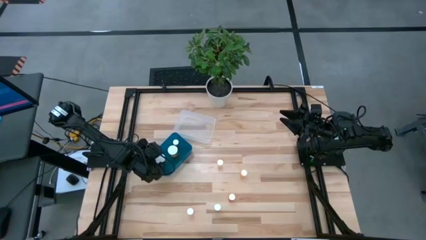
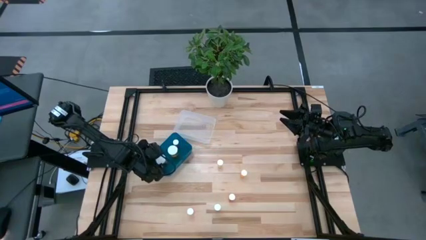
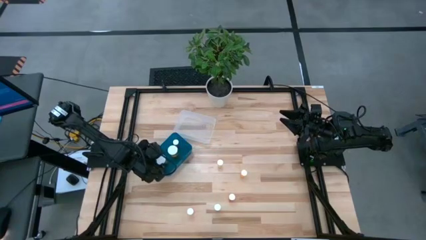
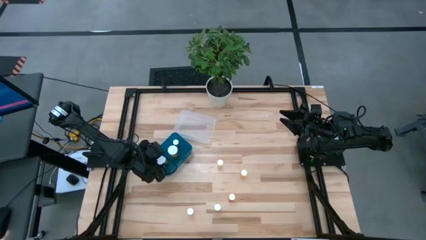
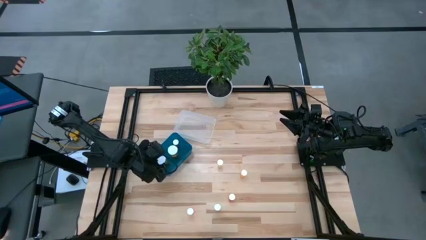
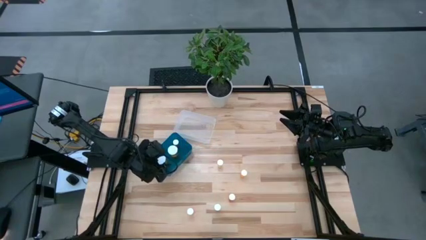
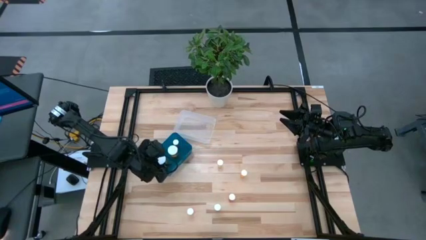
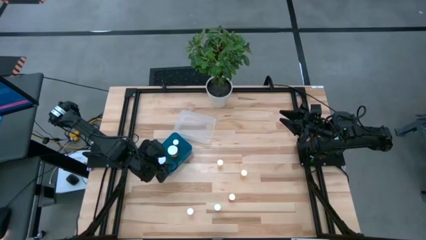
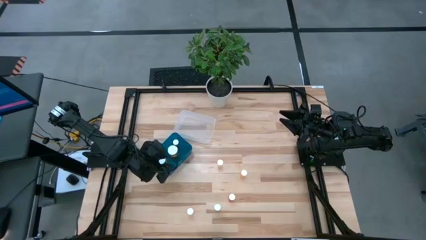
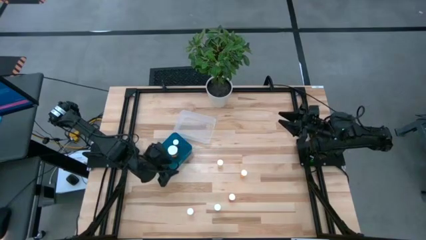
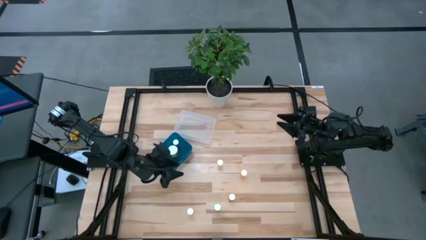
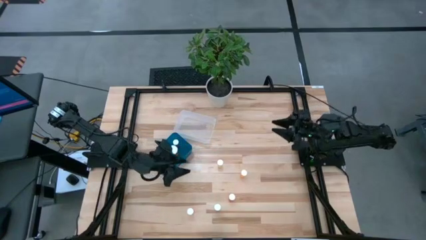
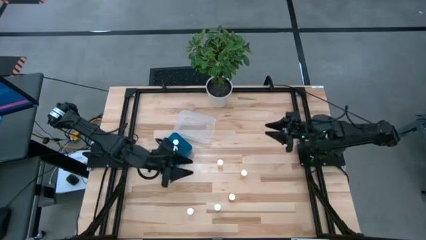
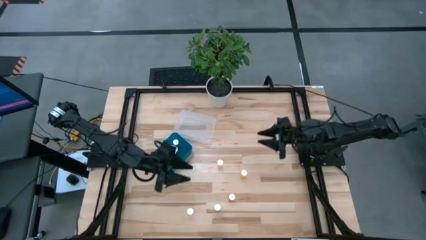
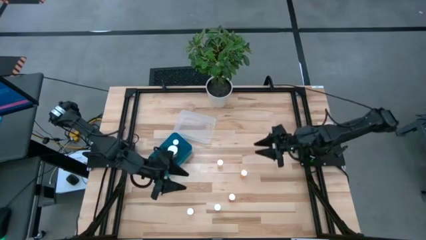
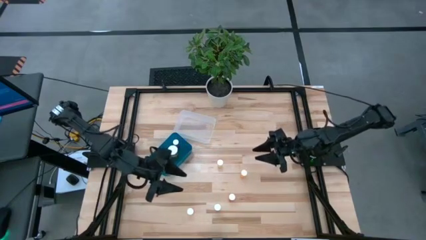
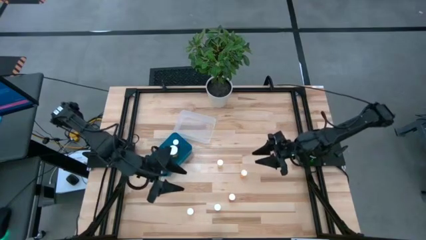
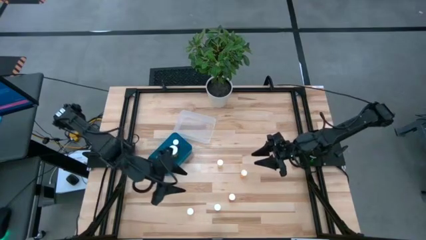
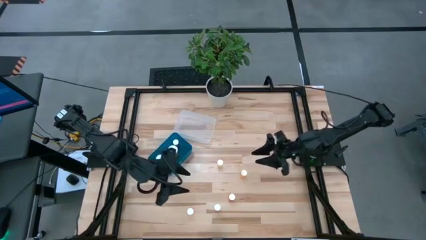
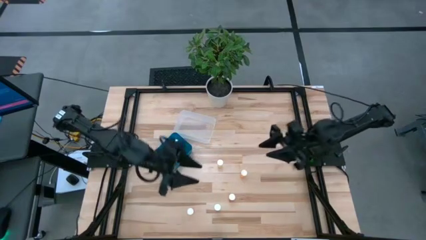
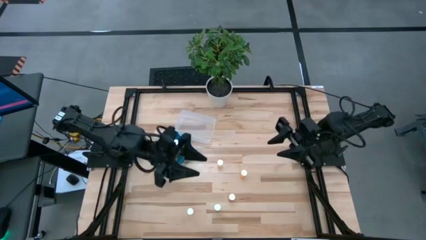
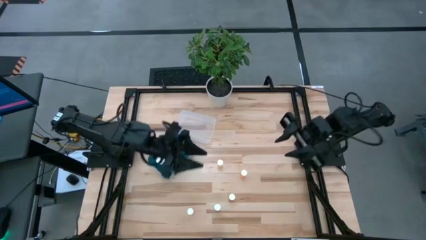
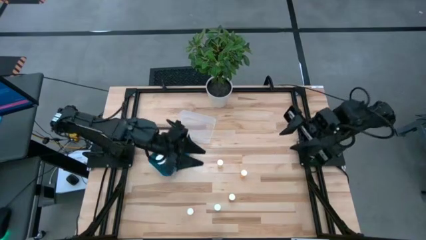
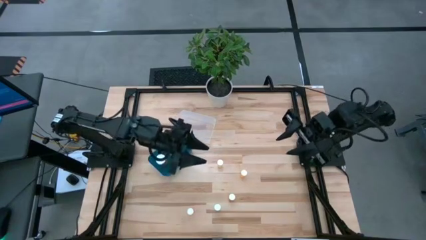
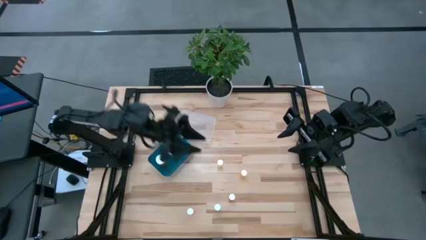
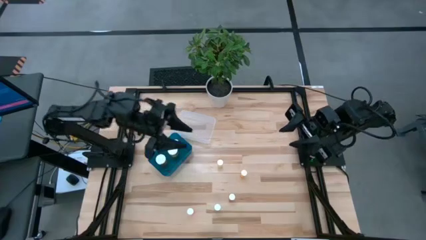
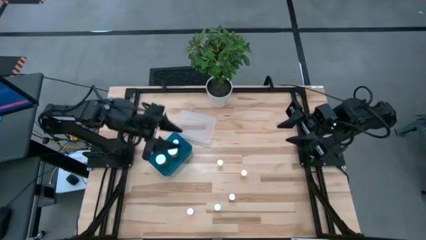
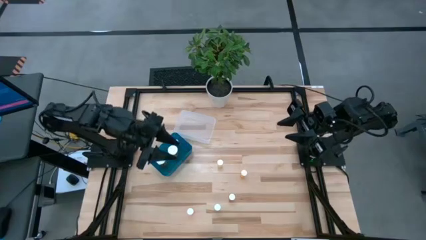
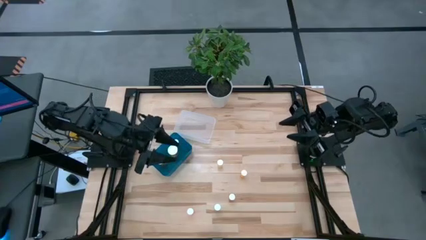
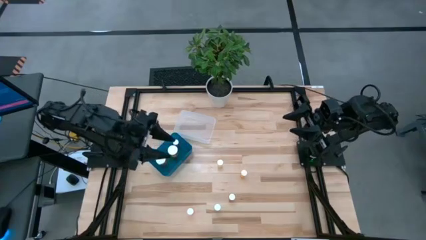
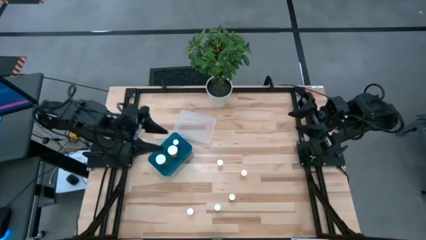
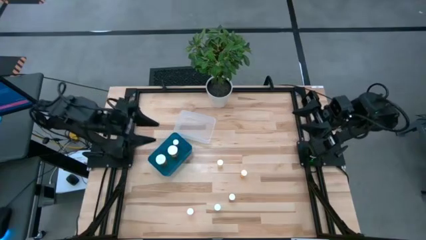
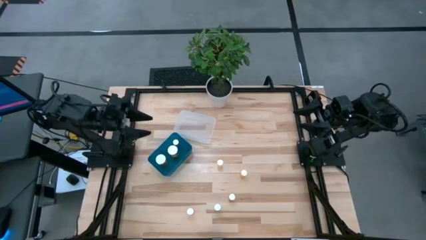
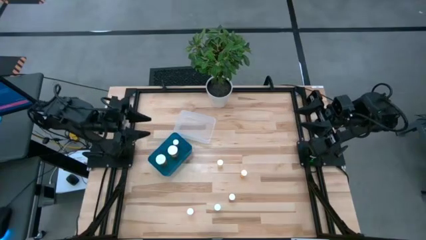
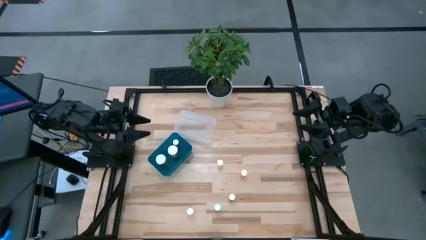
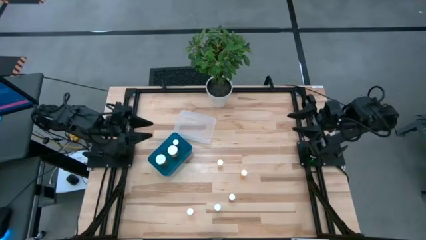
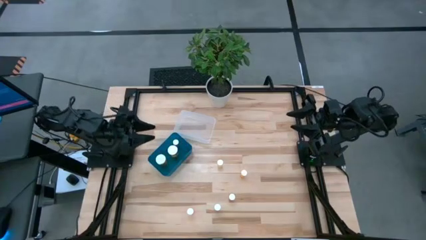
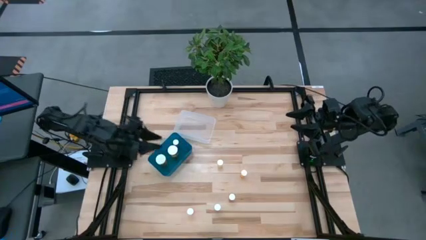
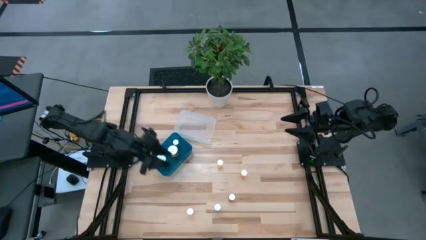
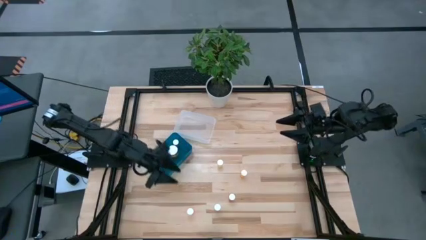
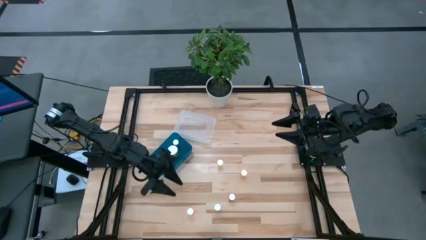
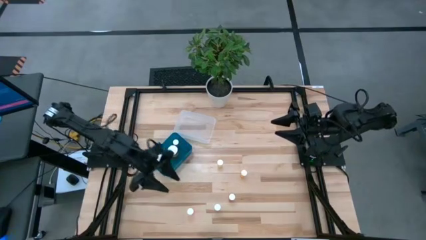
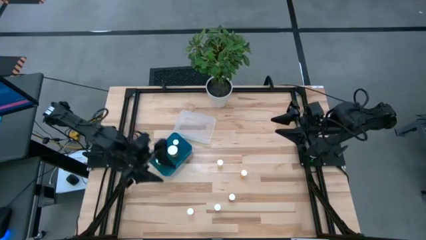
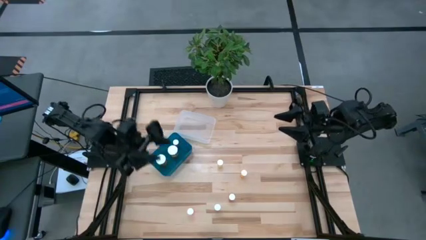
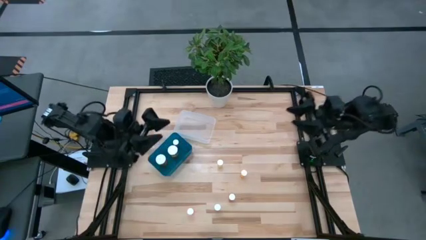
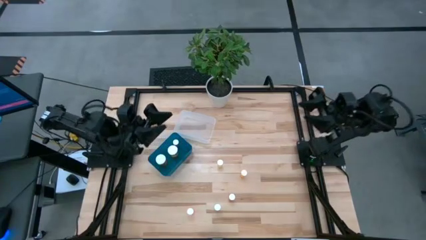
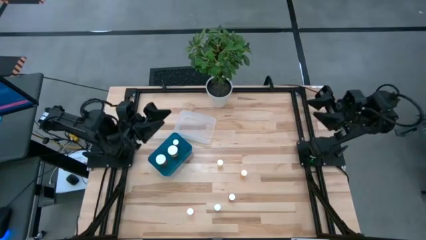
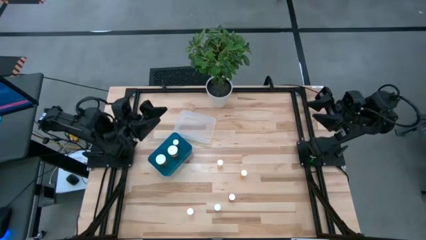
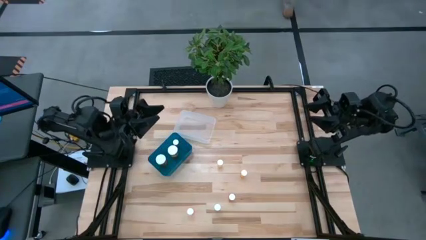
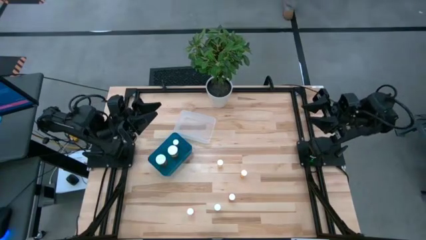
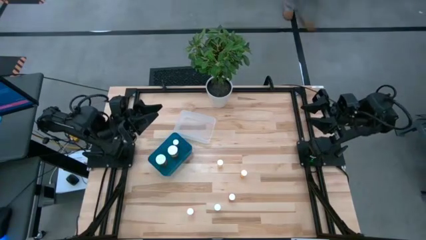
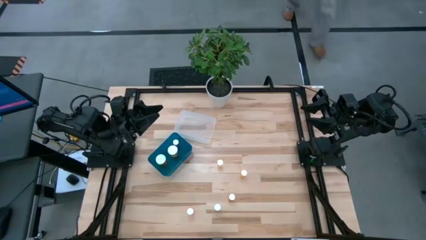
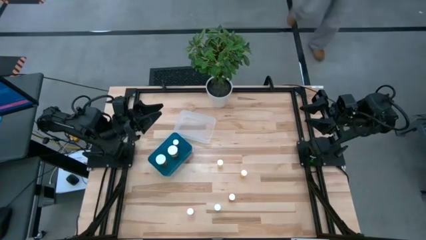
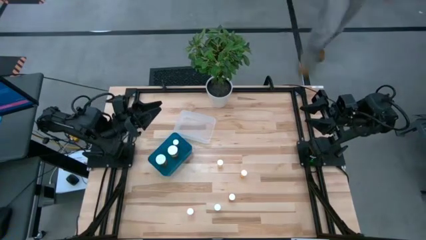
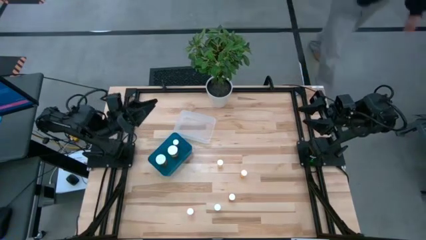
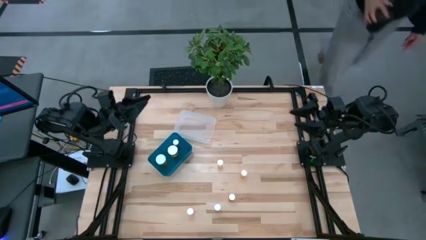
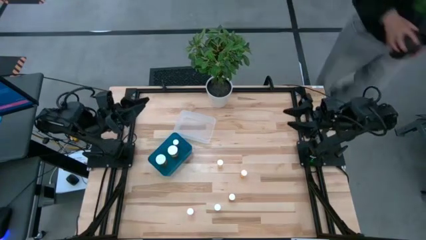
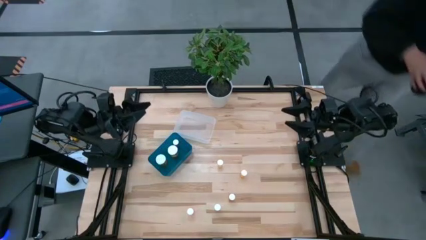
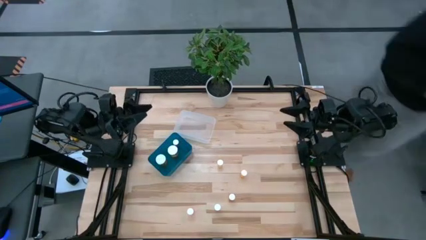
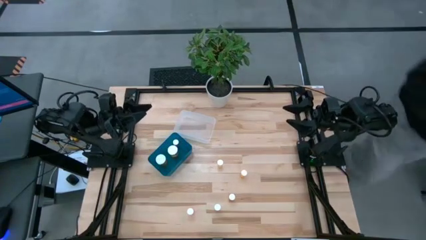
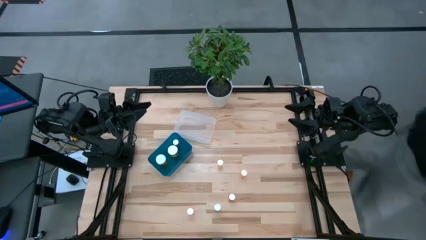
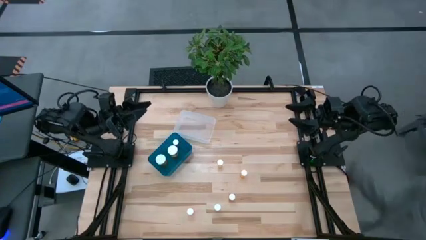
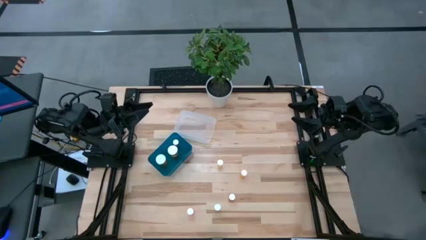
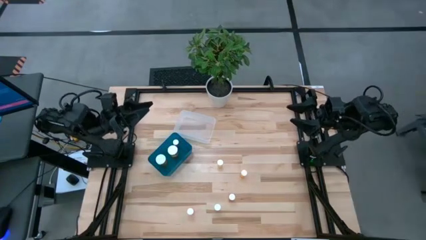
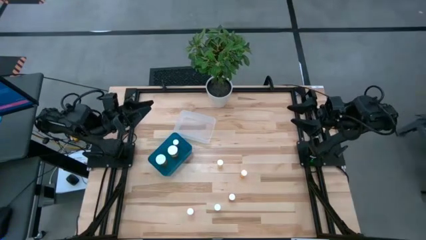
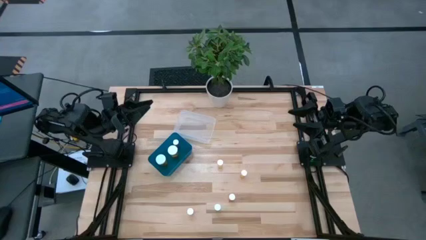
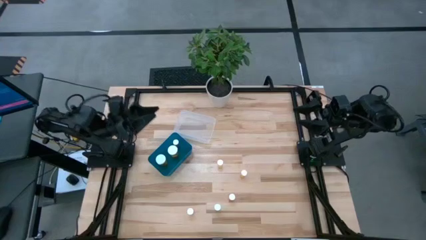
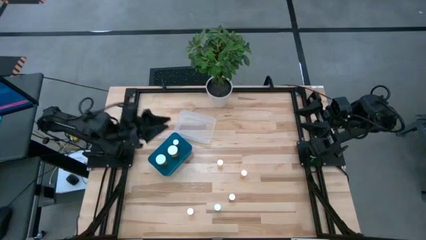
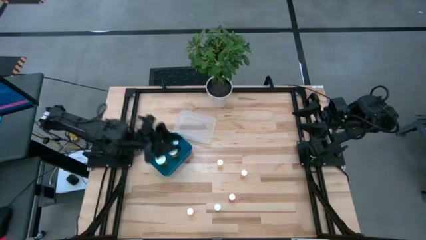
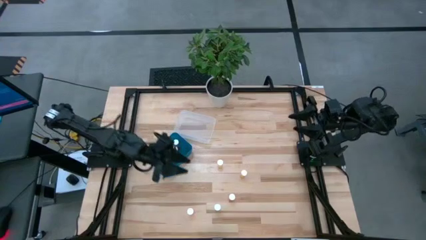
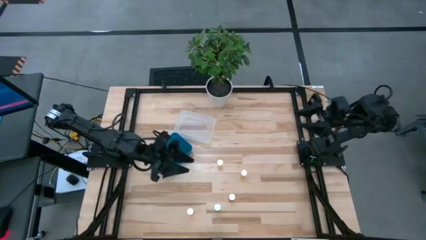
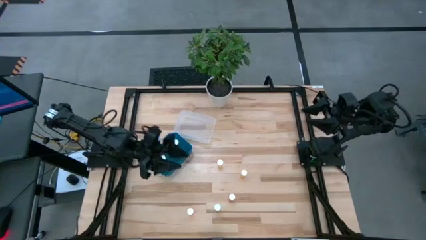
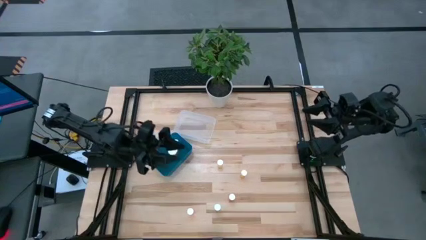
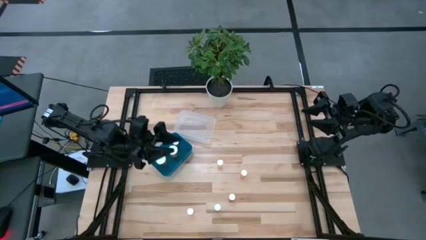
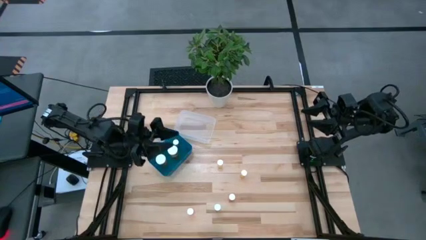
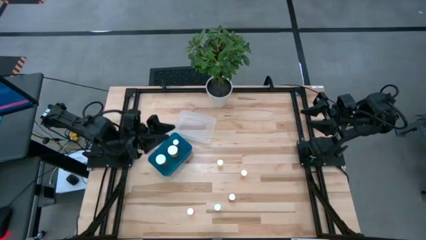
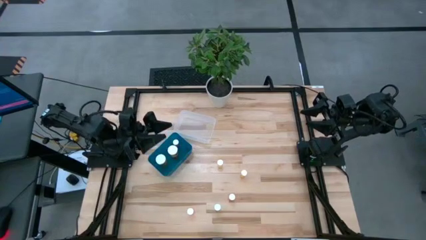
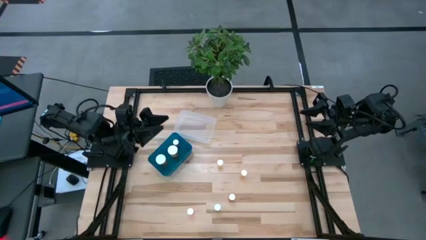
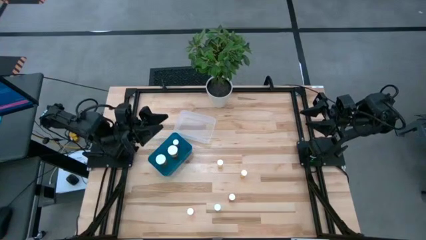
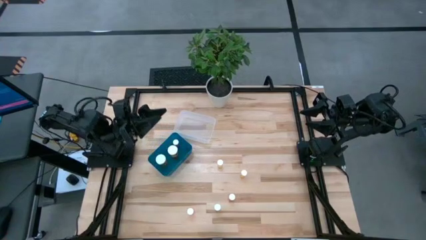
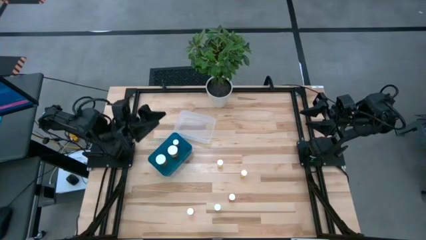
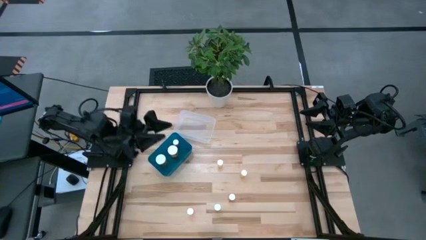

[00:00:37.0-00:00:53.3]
Task: Pick and place medicine bottles into bin by pill shape (circle, oval)
Put the orange pill bottle into the transparent bin
